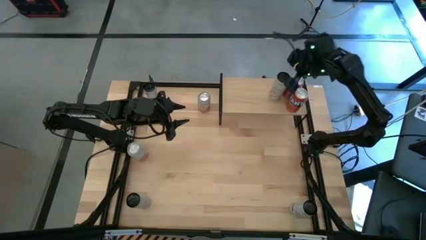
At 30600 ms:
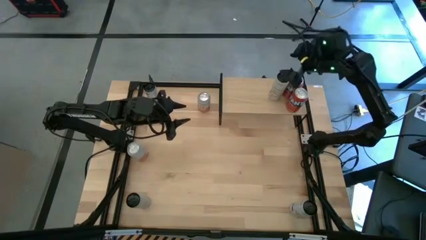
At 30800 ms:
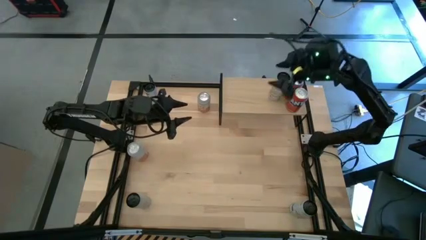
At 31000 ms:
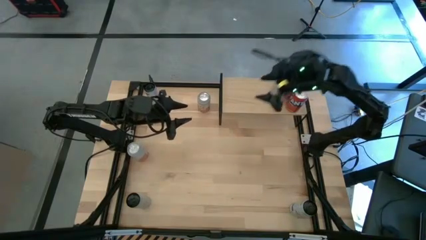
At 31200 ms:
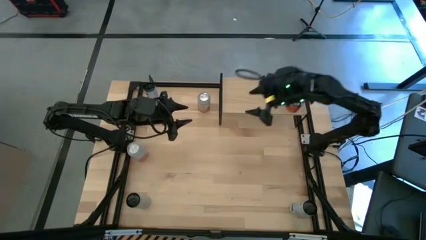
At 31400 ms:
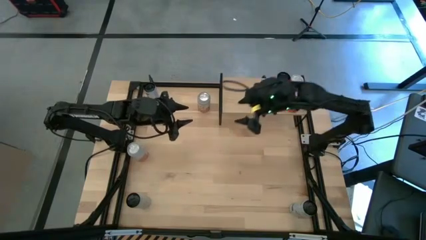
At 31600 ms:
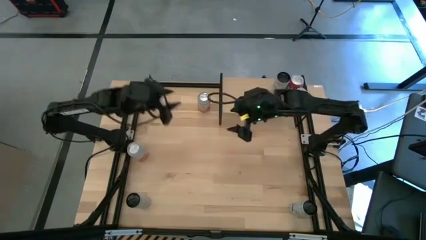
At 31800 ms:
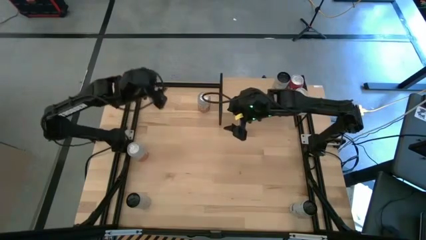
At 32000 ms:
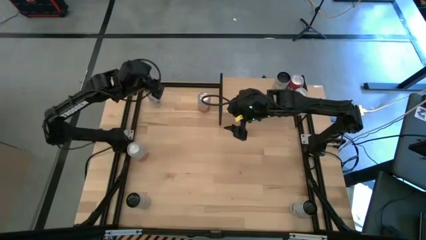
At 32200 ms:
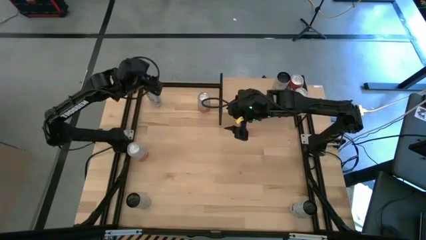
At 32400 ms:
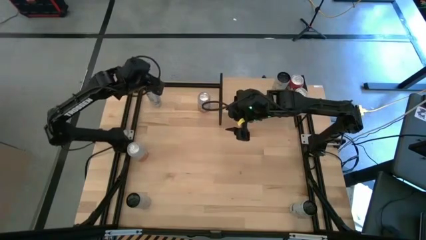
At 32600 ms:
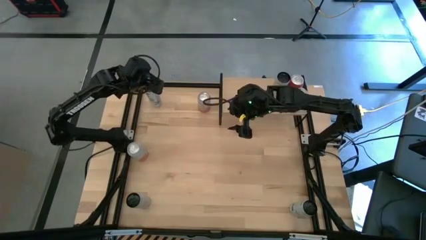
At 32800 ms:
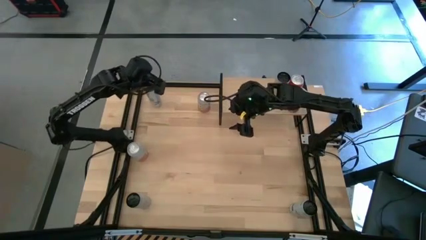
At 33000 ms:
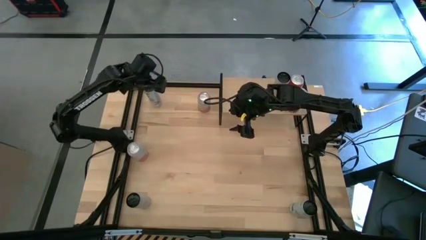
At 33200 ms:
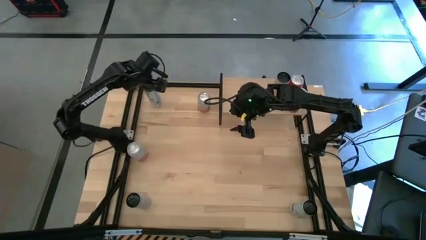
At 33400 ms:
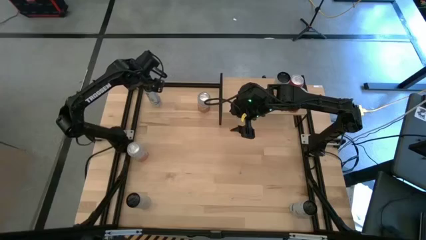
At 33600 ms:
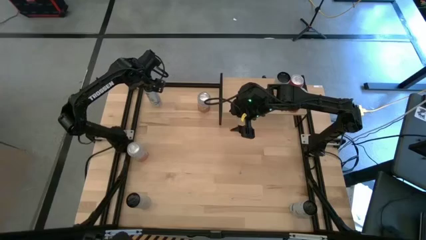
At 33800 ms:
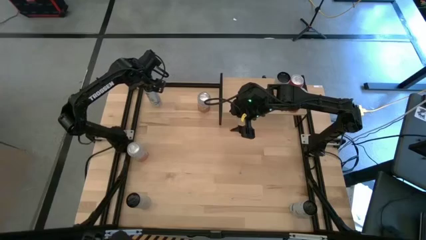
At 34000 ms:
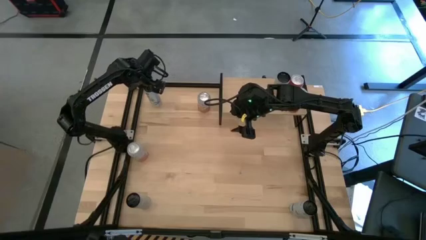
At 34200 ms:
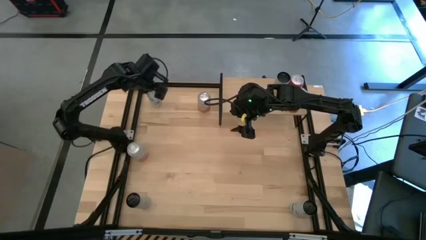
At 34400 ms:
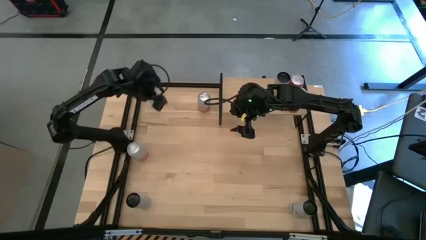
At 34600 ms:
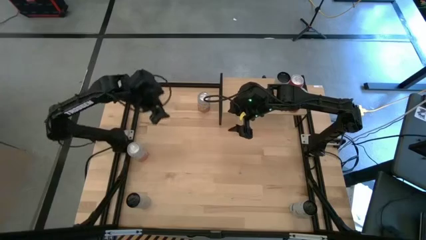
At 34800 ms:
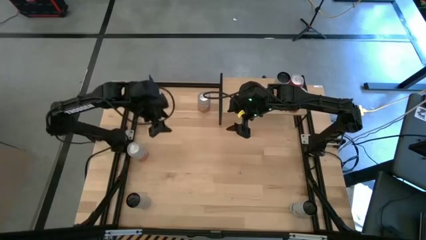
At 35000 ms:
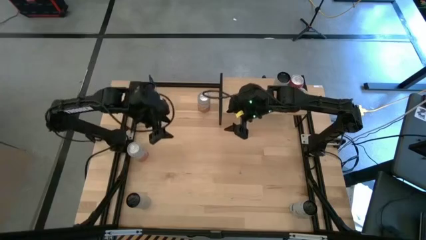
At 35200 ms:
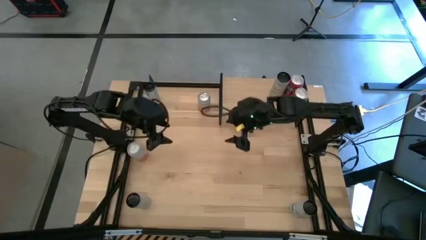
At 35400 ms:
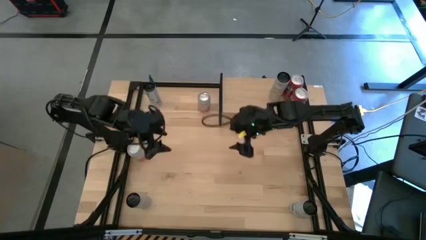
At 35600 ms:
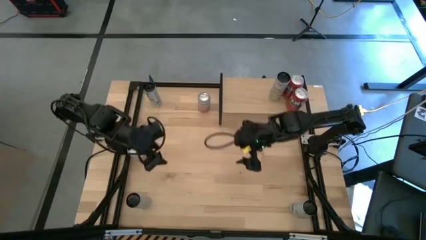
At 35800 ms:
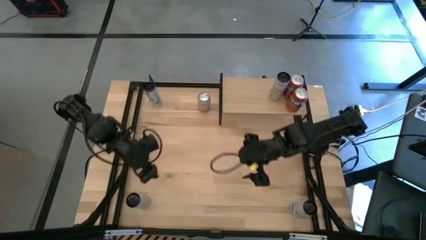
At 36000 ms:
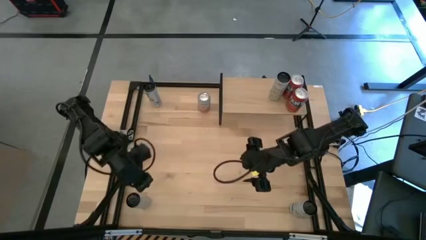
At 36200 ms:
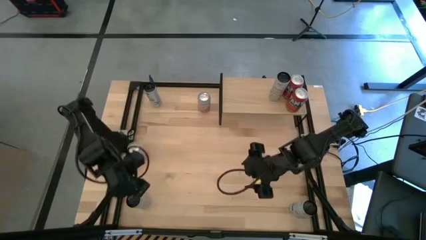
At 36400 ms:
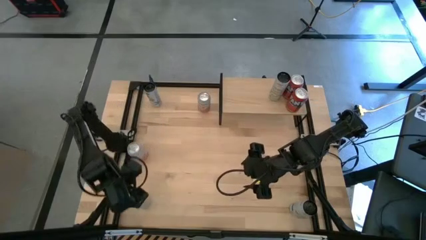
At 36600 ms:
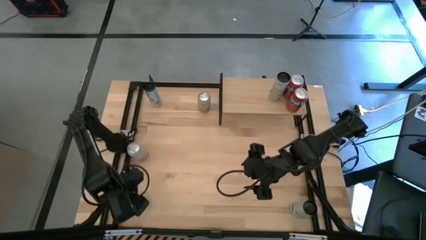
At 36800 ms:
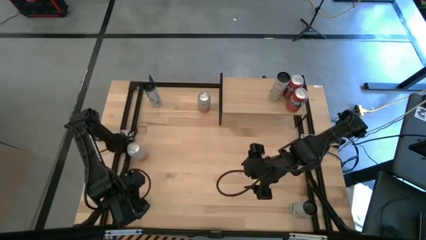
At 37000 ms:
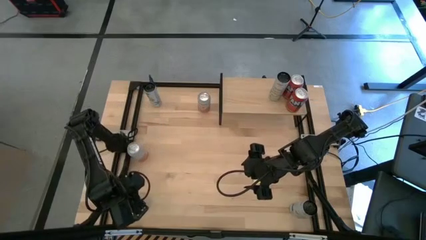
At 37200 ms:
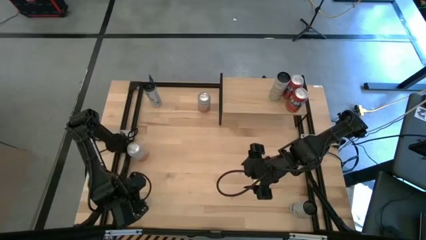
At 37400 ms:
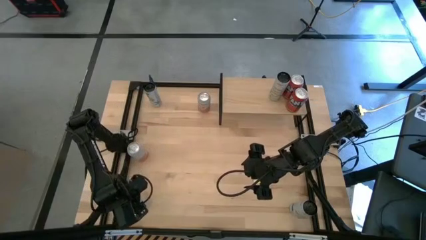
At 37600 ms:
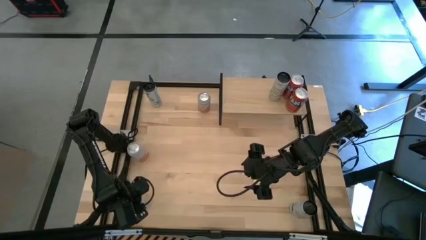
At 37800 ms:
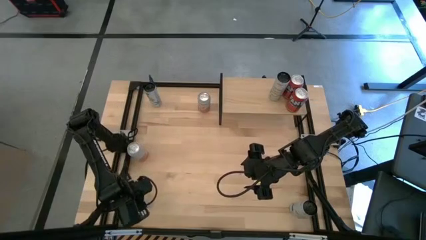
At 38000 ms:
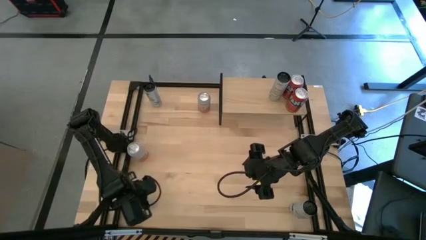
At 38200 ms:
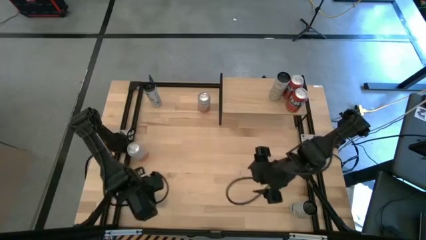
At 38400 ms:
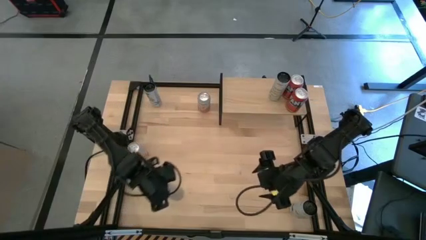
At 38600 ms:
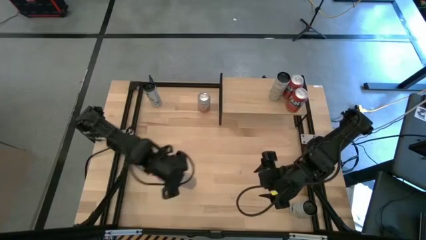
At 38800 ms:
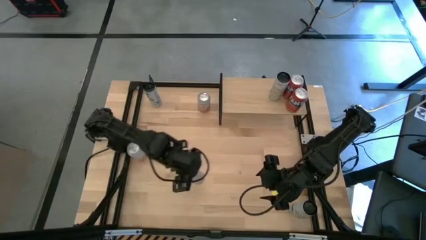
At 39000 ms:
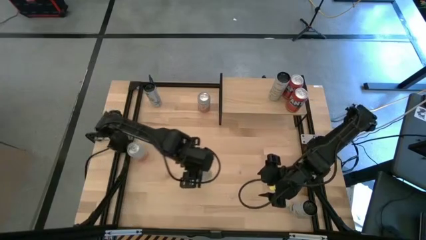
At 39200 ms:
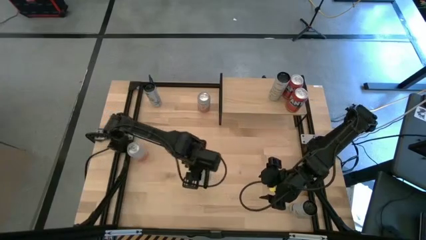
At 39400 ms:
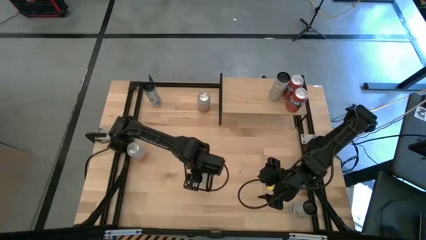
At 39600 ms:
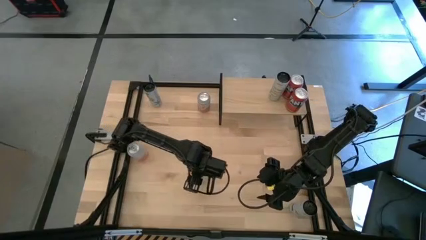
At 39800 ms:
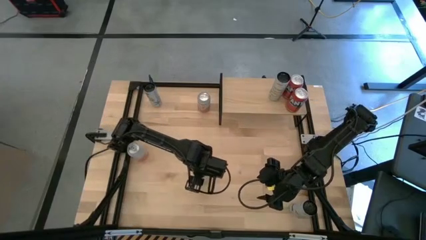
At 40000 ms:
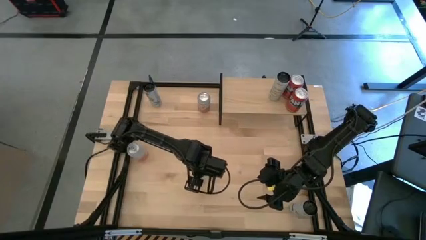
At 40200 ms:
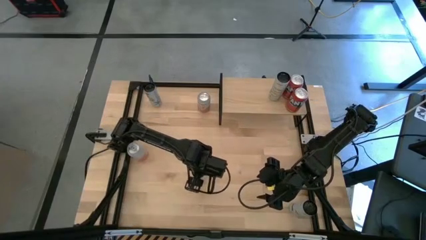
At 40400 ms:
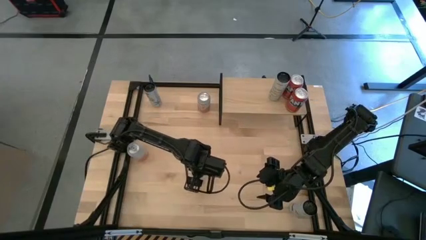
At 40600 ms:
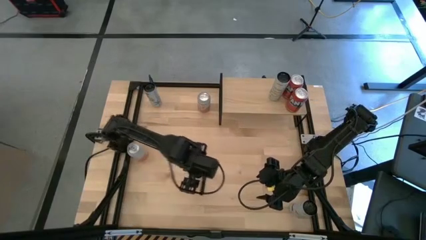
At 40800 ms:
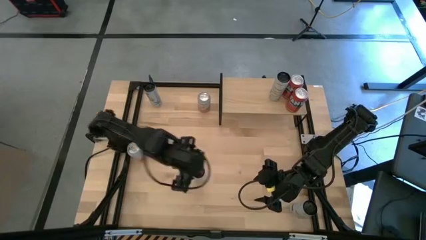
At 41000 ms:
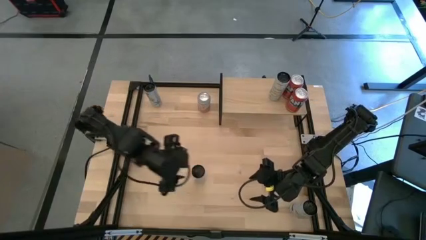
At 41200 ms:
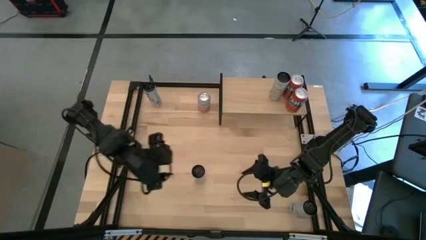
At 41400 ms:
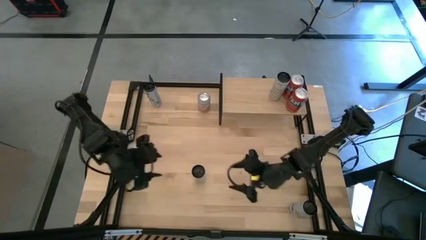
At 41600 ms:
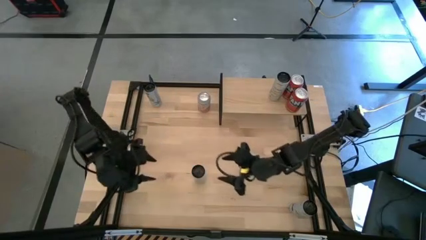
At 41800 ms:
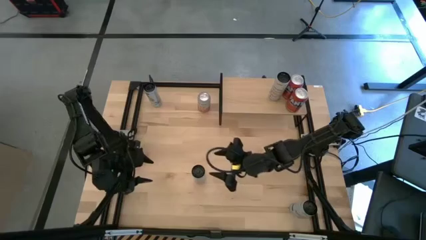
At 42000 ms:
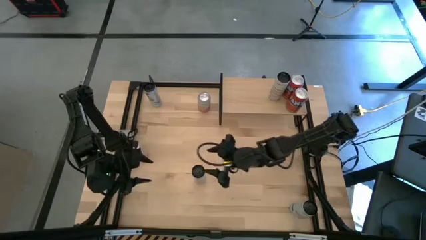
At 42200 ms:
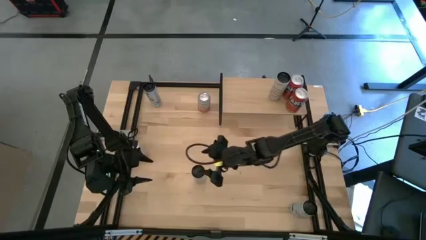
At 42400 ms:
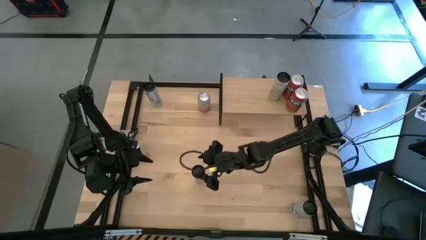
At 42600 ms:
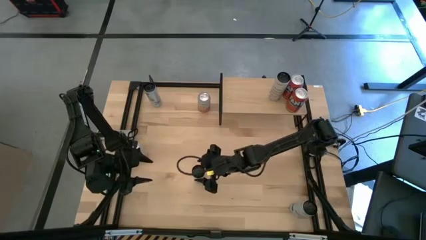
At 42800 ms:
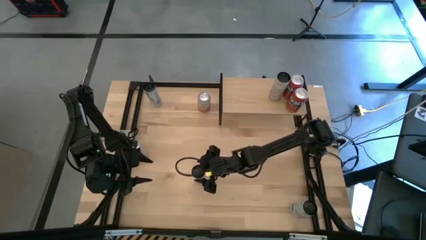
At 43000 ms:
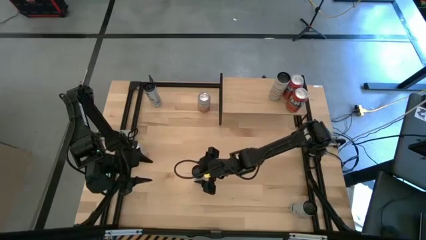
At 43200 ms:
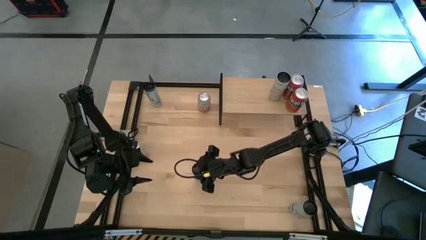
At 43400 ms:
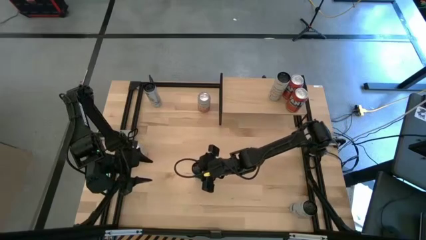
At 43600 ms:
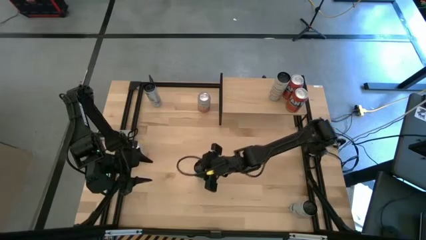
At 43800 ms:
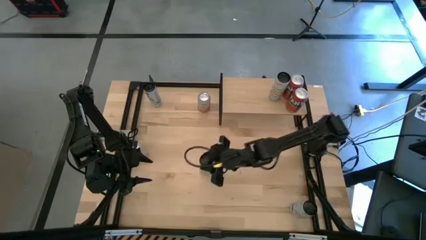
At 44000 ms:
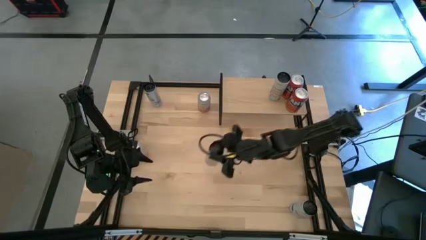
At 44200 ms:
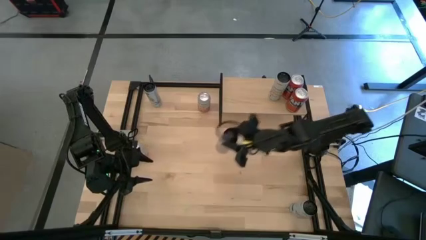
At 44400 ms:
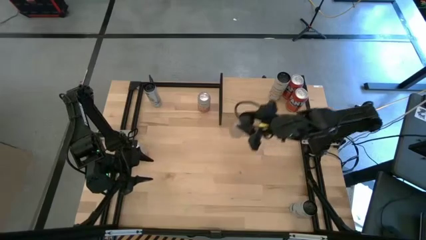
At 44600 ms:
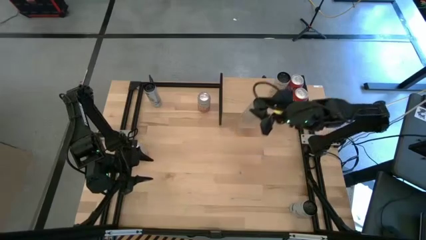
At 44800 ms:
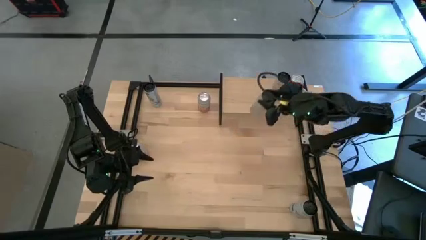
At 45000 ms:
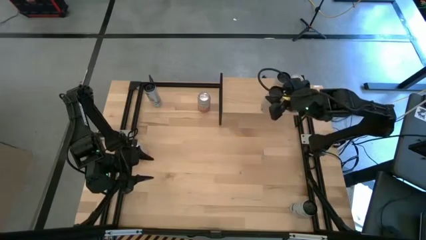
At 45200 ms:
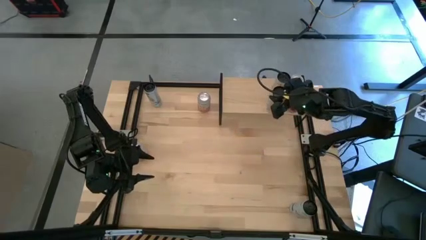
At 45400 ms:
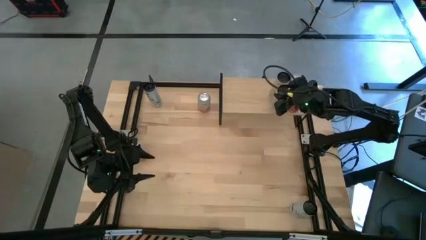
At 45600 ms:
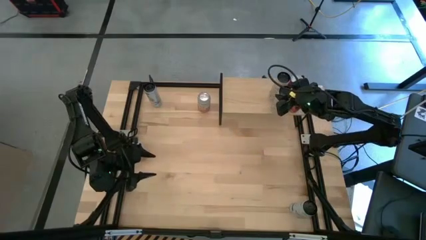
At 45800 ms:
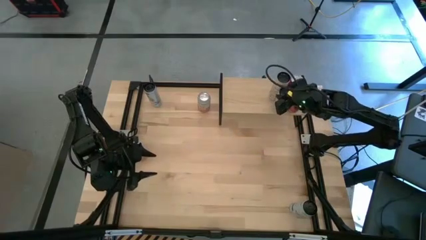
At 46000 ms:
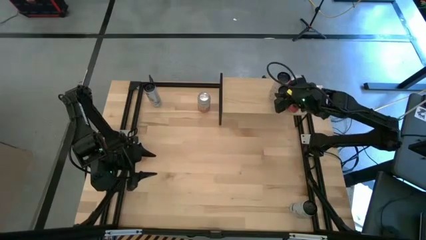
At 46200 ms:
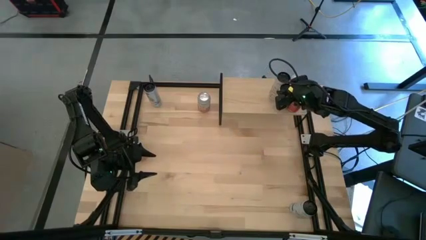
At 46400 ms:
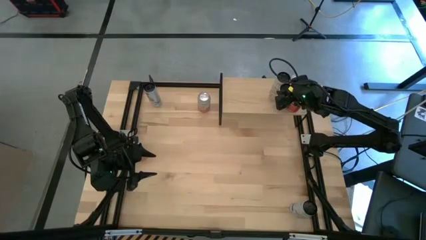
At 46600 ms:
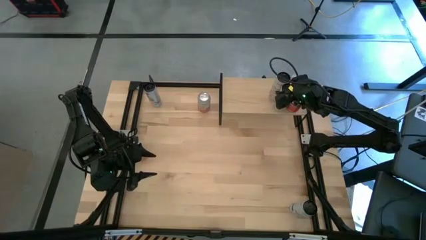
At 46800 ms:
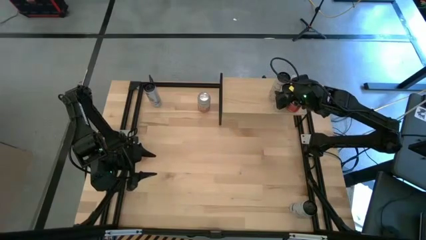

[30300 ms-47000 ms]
Task: Place canned beverage on shelf
Put the white yellow soda can on the shelf aligned with the other white yellow soda can
